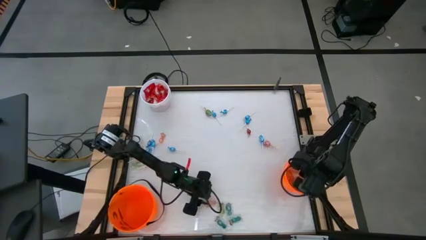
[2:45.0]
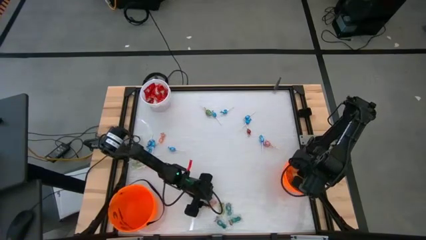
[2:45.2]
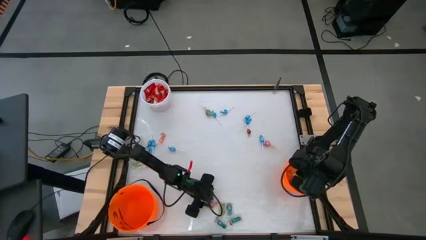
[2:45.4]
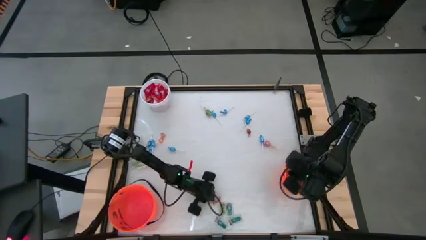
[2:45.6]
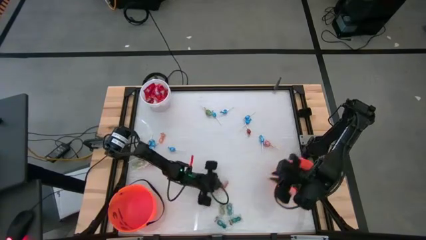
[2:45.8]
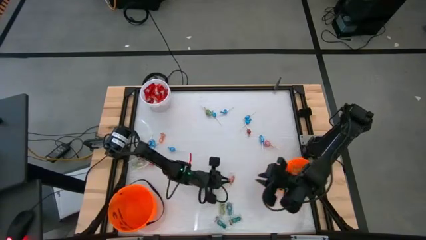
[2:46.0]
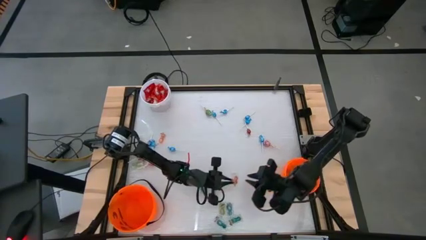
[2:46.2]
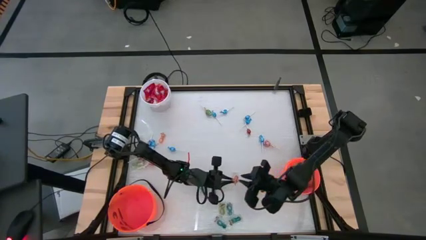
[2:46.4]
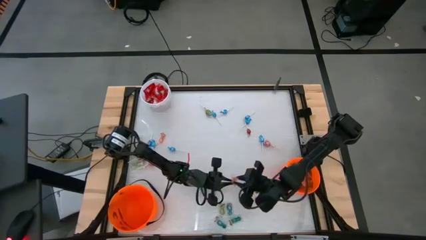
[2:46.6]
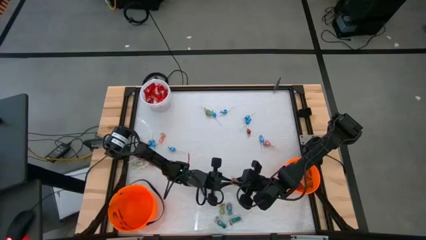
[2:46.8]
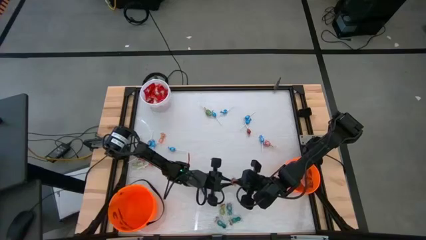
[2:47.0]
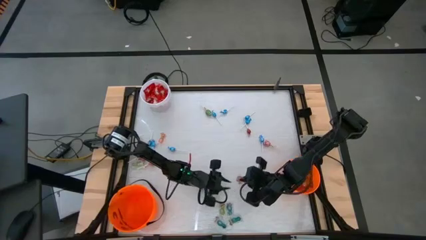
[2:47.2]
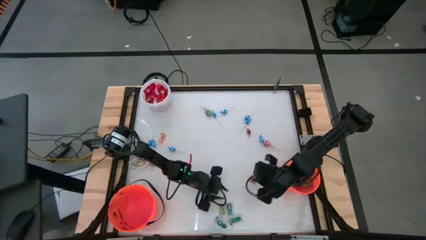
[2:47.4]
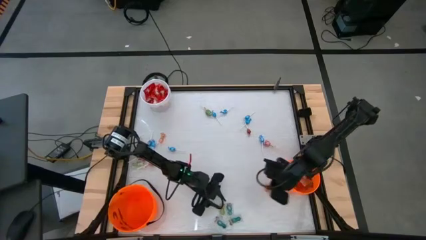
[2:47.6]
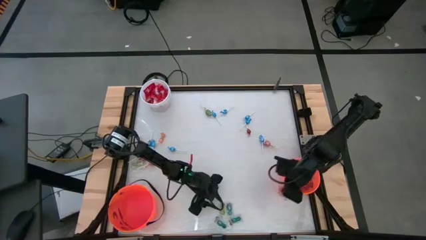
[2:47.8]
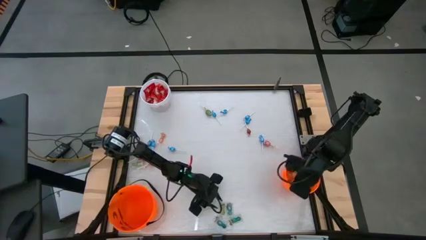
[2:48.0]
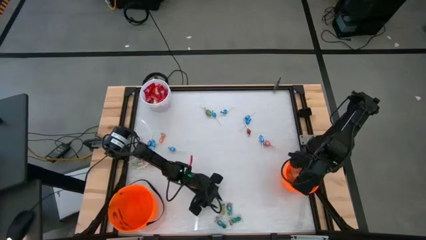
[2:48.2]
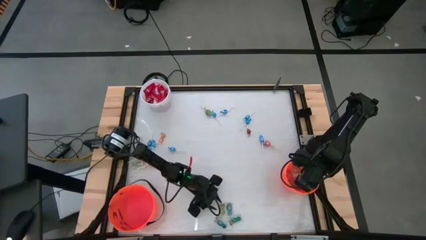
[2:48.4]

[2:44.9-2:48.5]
Task: Sort candy by brand, put in halloween buckets
Put the bottom orange candy into the right orange bucket

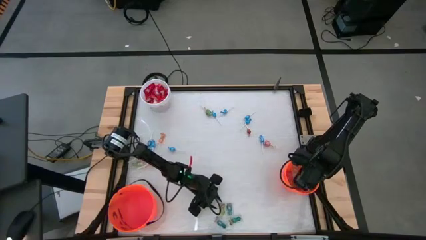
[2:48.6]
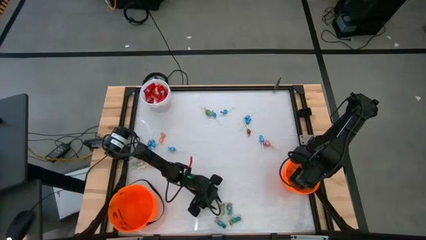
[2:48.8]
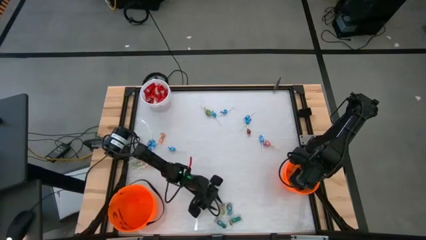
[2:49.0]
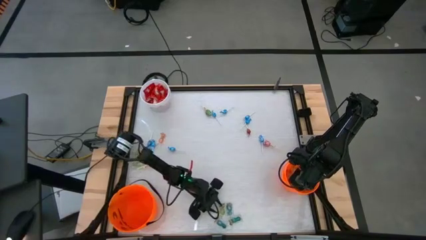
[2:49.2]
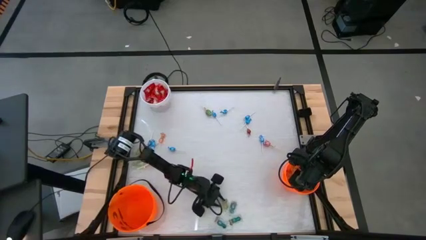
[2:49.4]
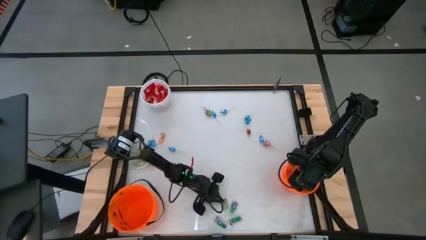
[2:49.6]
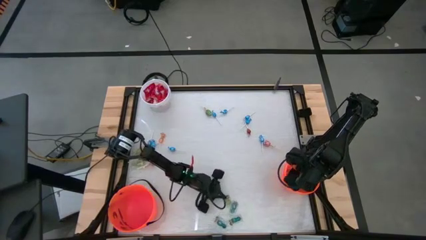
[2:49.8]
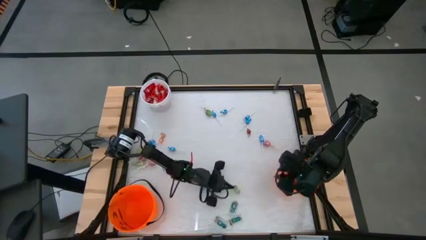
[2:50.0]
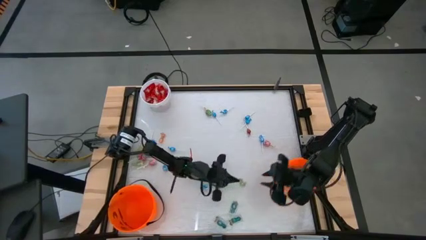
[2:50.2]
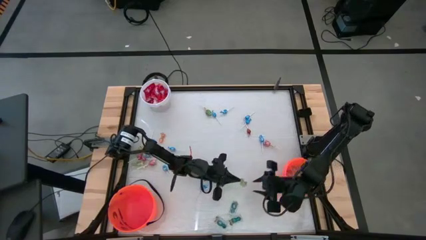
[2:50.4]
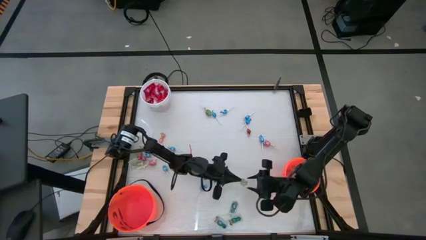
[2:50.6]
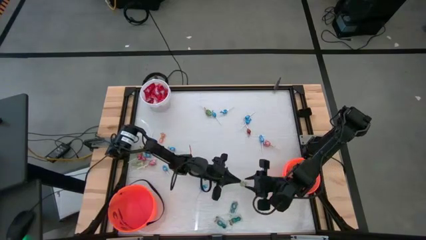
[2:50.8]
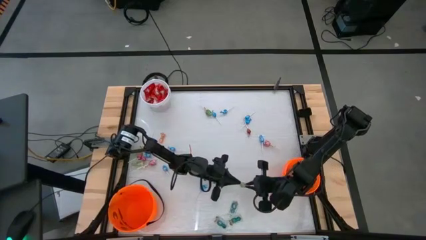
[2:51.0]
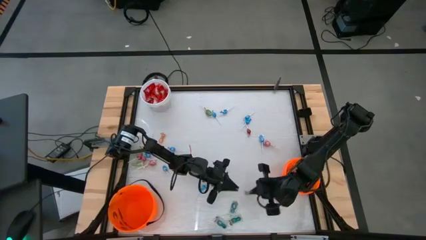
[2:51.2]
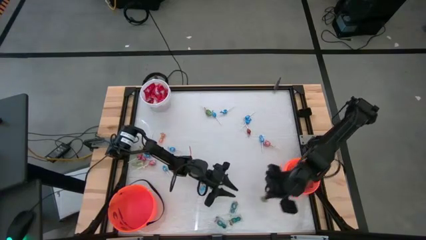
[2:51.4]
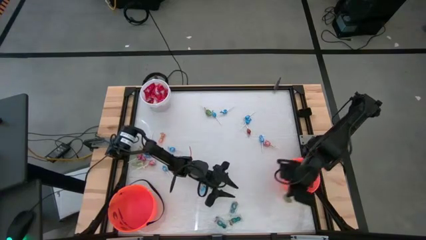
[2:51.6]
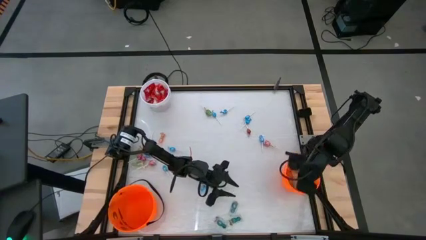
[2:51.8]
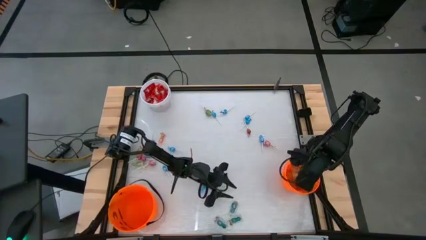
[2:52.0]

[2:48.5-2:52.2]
Put the bottom green candy into the right orange bucket

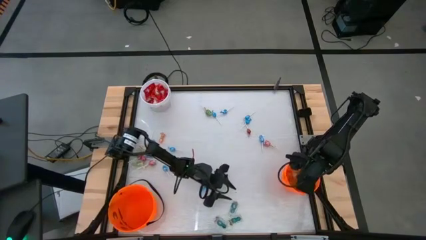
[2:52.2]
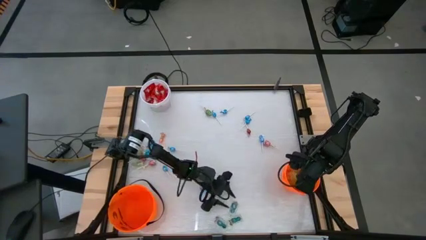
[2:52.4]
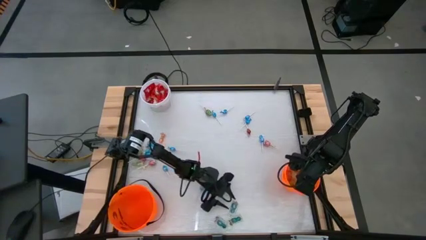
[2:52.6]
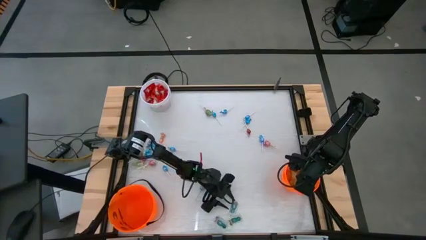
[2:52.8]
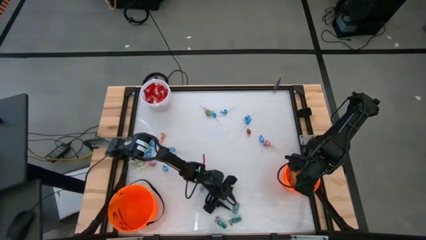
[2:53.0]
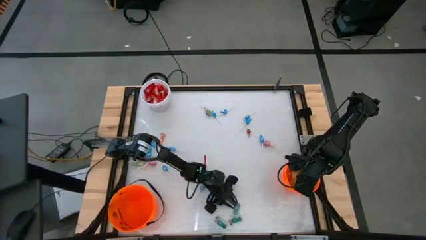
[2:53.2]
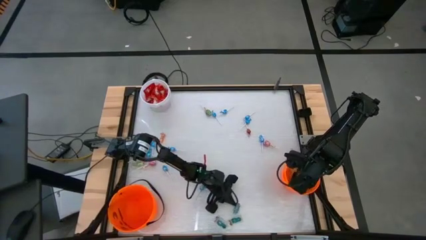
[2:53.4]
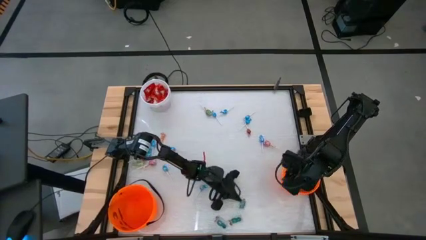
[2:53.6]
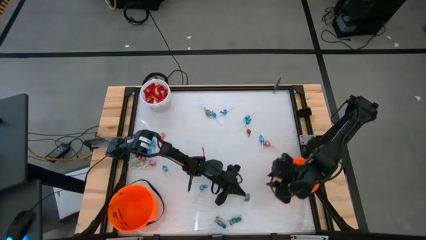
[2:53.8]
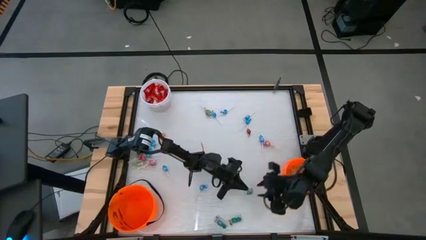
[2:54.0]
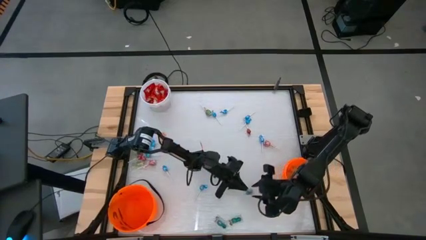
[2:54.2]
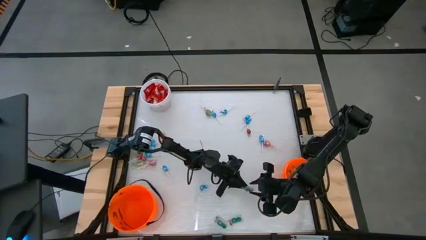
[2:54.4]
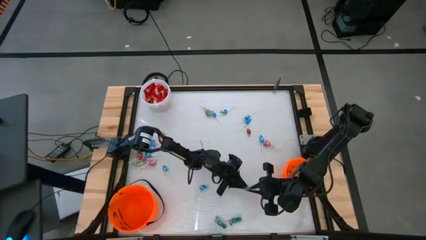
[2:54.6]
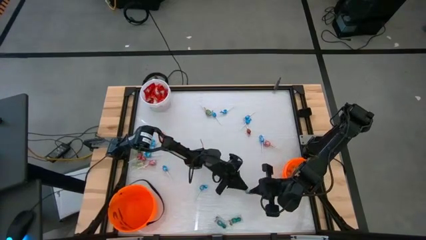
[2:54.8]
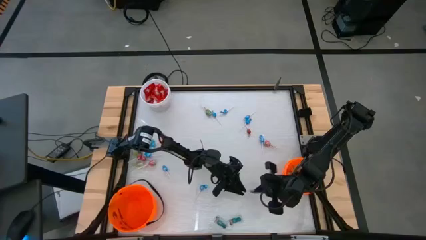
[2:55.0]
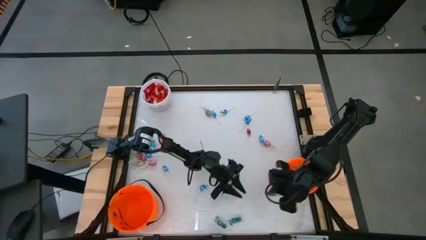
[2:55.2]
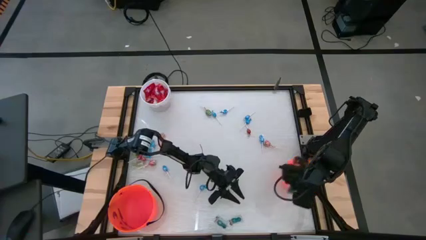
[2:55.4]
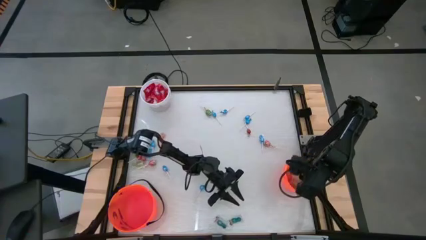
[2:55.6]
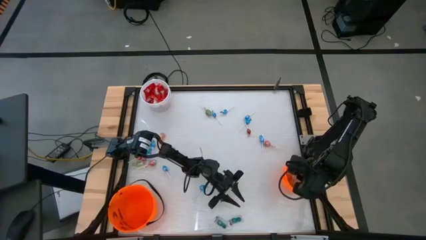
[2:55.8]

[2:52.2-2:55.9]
Put the blue candy into the right orange bucket

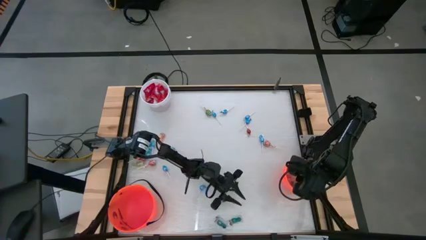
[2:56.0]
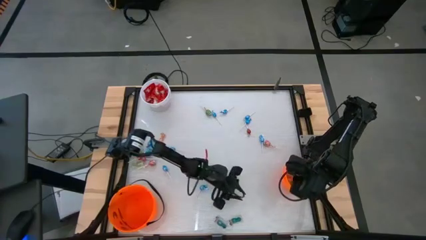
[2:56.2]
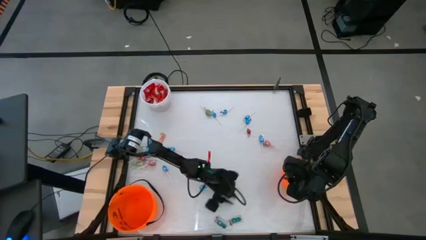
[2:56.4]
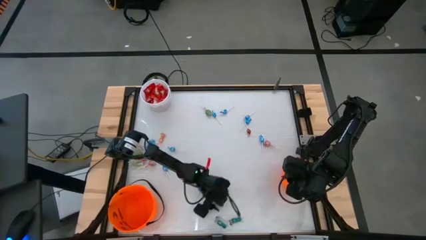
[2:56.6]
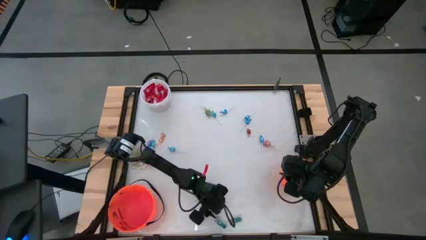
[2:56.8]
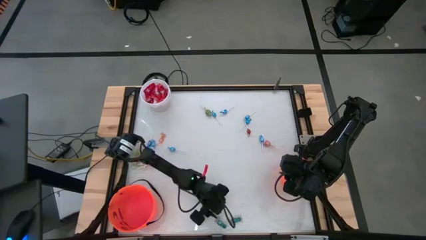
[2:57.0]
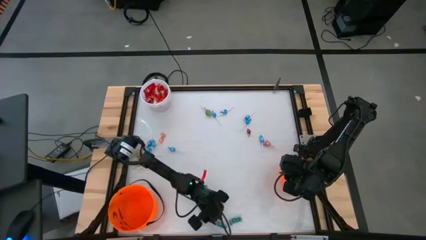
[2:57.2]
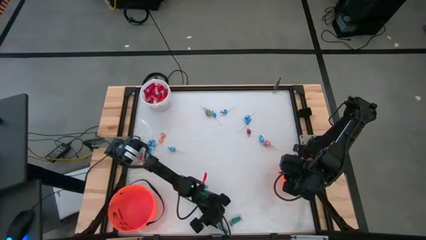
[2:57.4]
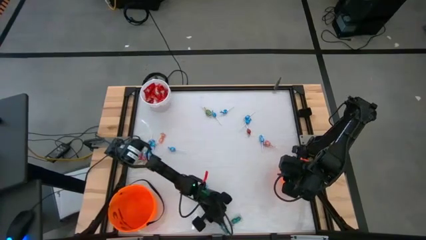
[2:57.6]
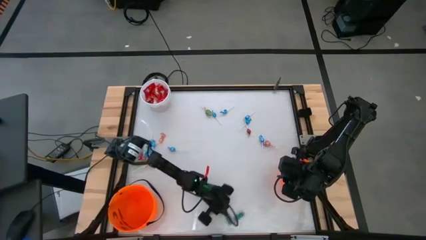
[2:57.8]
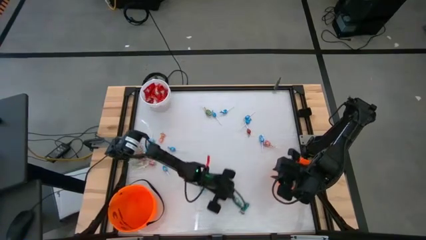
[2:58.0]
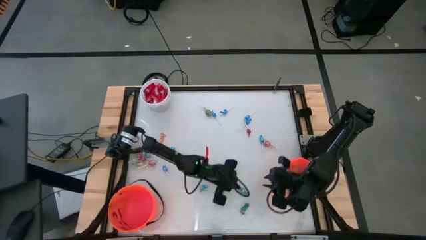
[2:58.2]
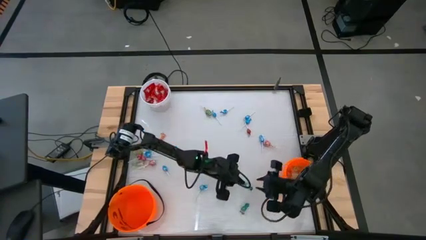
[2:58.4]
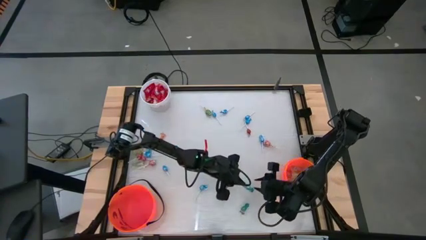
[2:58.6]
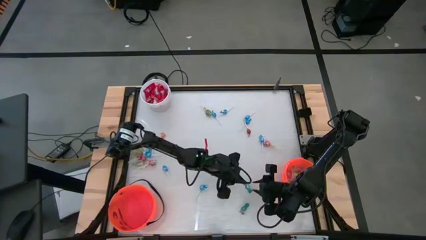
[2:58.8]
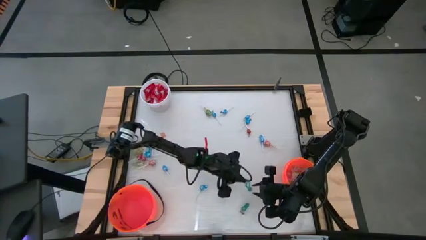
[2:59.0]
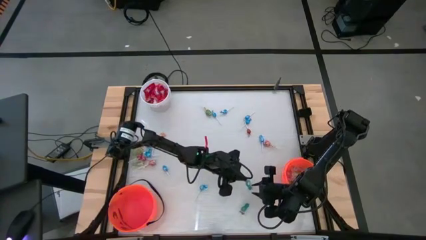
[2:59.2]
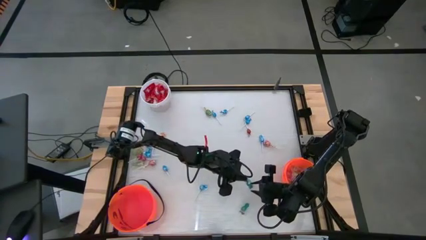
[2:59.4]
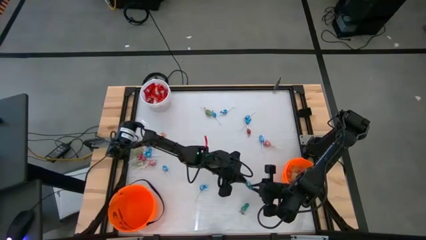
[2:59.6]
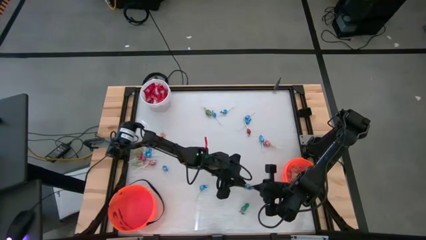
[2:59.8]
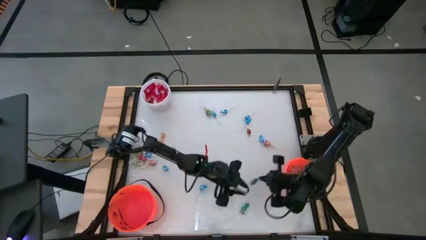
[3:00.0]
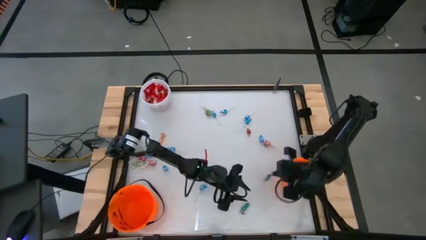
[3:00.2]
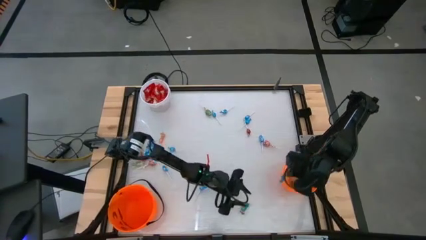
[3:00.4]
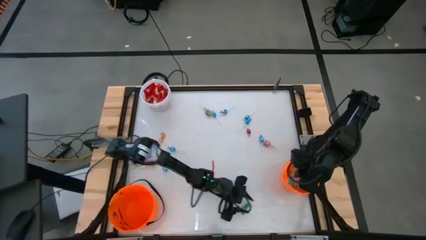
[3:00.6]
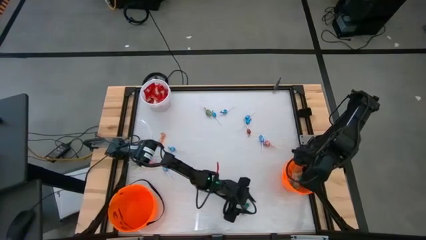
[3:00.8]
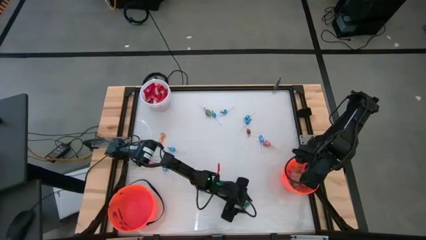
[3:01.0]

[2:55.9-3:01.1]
Put the blue candy into the right orange bucket

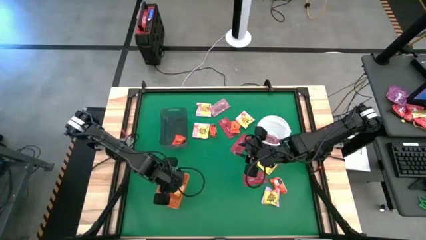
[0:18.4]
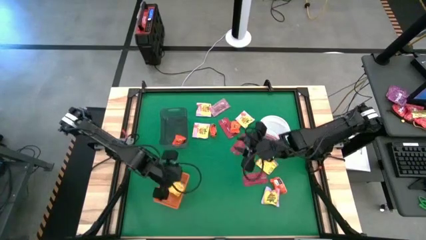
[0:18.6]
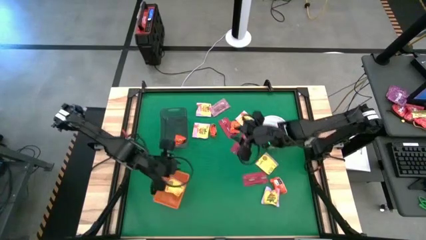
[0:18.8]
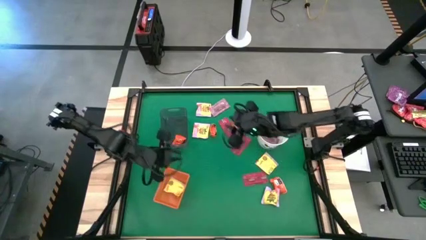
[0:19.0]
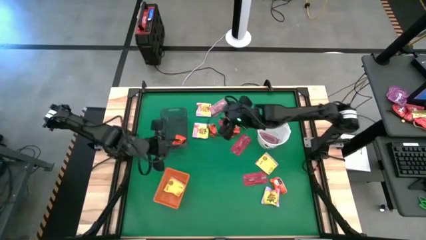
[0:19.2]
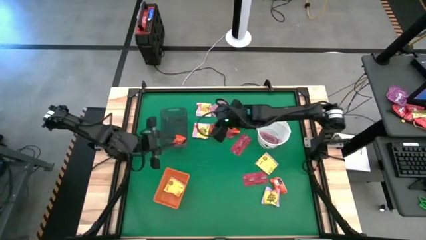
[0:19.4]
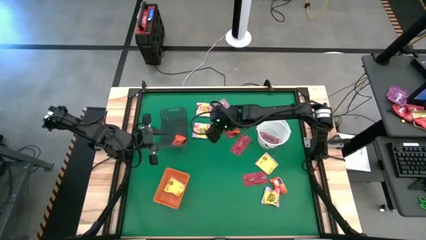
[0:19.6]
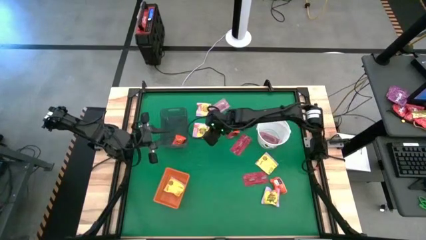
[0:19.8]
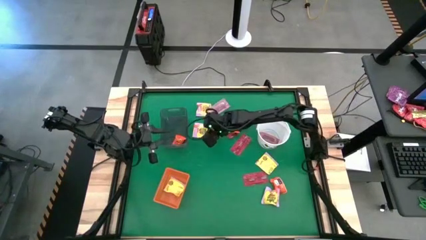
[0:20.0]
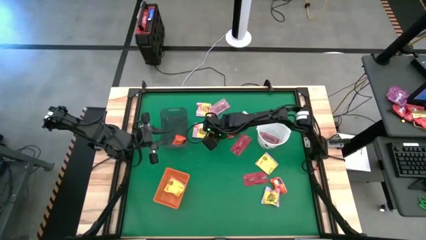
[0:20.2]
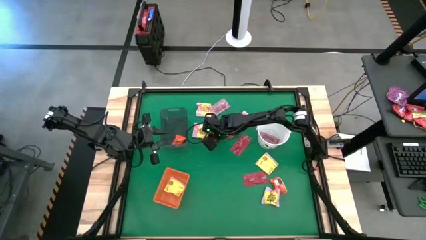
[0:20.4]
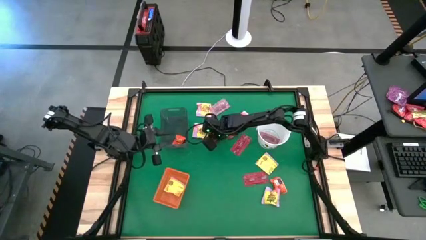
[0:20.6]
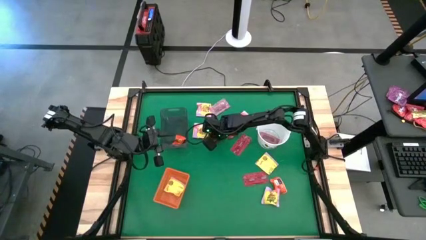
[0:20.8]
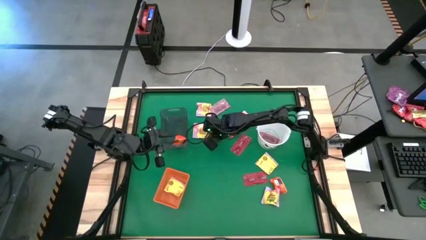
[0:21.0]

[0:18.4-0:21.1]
Task: Sort candy by brand, put in halloween buckets
Put the orange chocolate into the black bin
